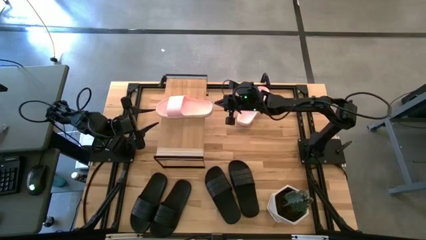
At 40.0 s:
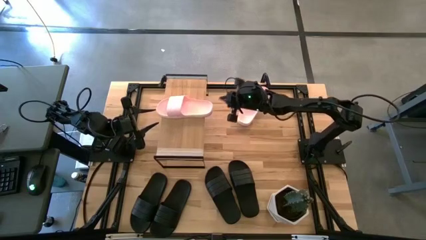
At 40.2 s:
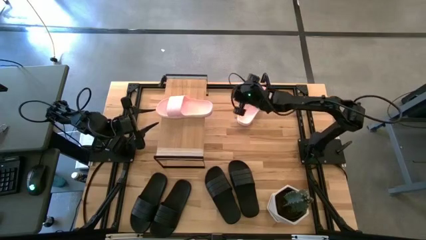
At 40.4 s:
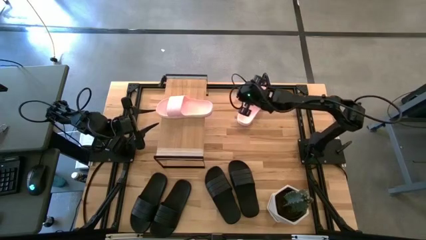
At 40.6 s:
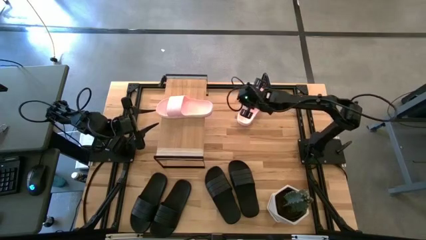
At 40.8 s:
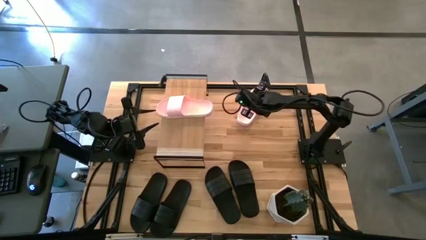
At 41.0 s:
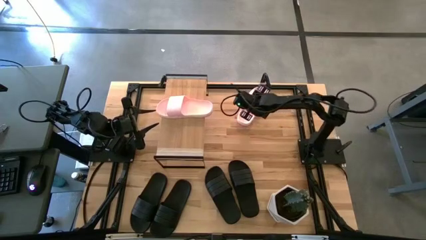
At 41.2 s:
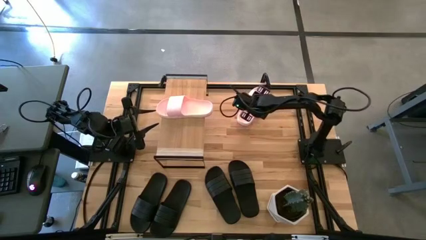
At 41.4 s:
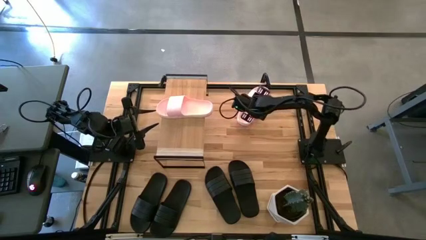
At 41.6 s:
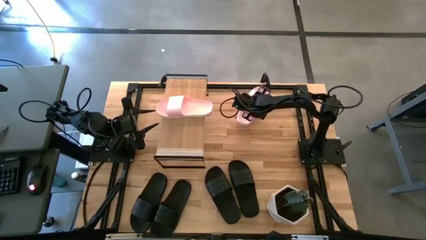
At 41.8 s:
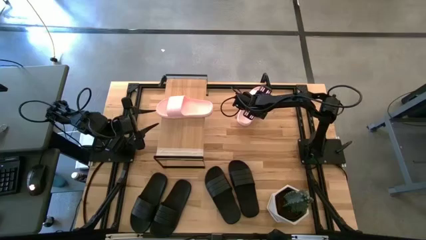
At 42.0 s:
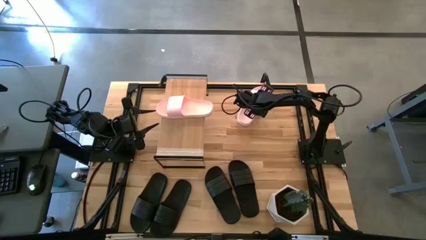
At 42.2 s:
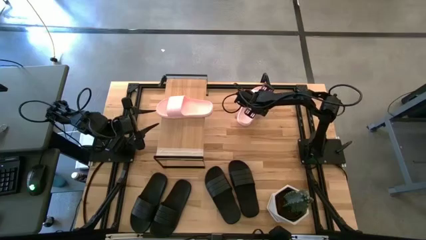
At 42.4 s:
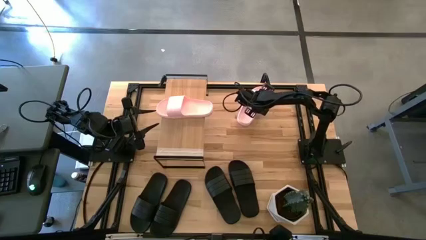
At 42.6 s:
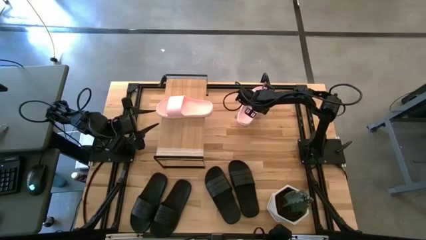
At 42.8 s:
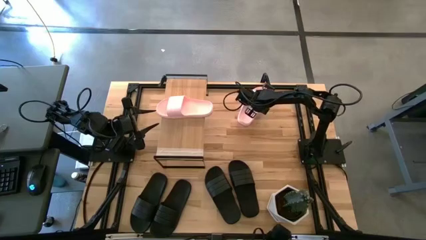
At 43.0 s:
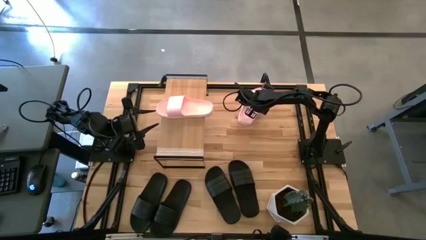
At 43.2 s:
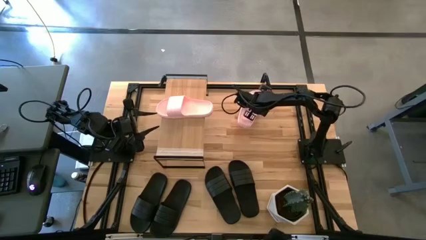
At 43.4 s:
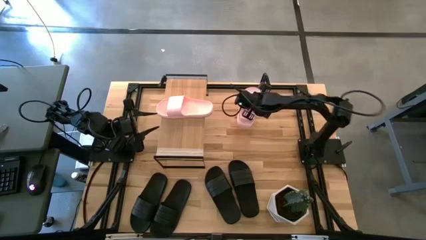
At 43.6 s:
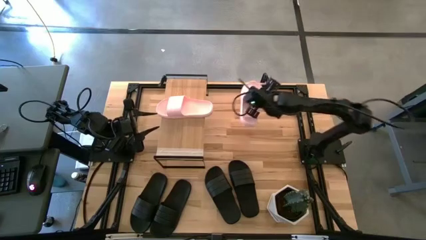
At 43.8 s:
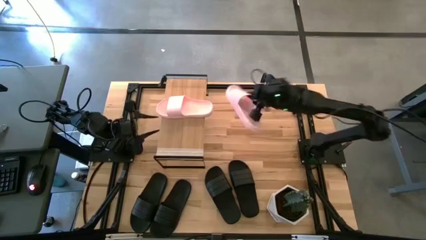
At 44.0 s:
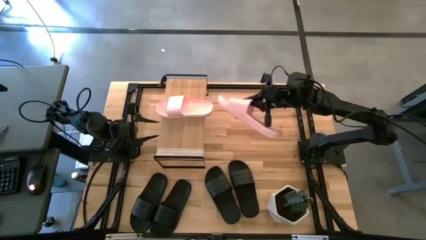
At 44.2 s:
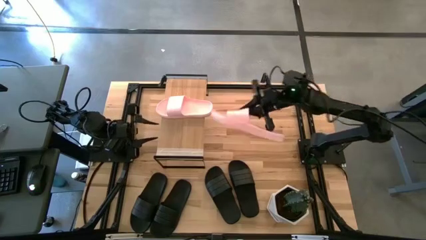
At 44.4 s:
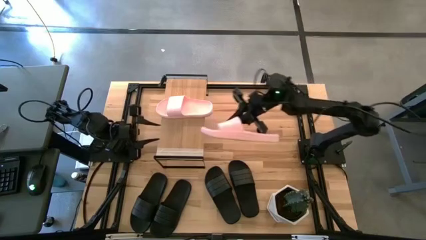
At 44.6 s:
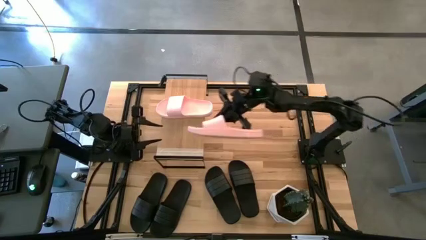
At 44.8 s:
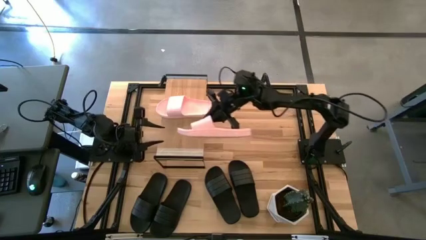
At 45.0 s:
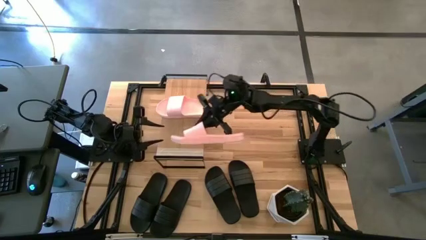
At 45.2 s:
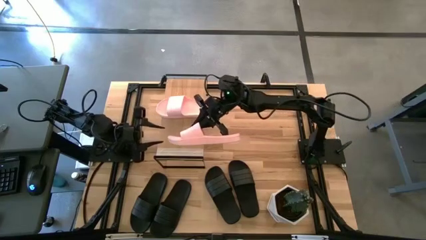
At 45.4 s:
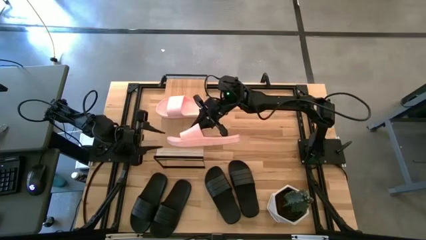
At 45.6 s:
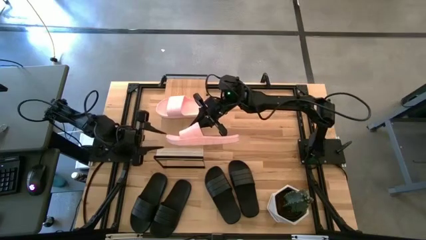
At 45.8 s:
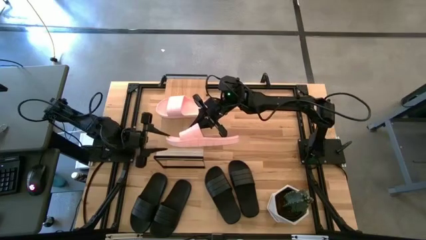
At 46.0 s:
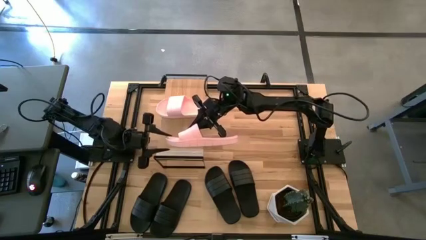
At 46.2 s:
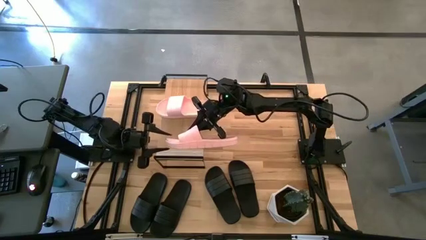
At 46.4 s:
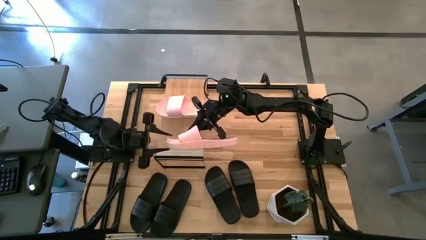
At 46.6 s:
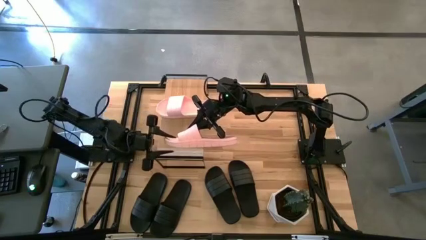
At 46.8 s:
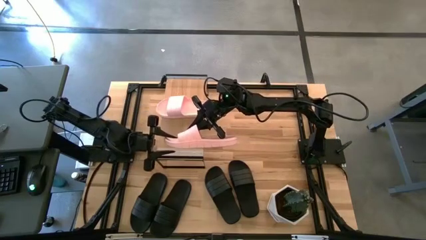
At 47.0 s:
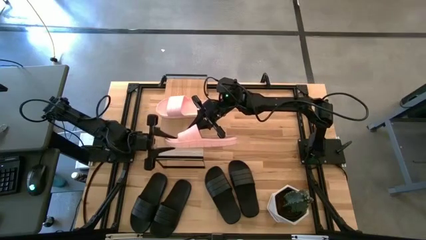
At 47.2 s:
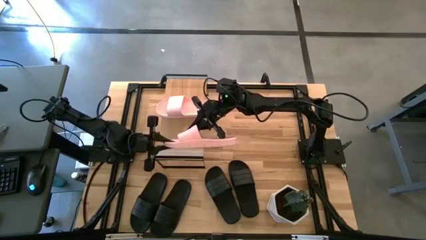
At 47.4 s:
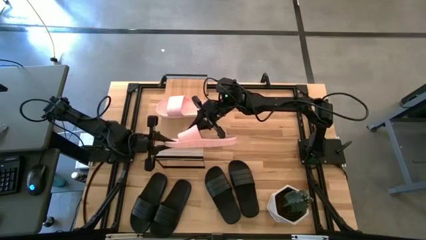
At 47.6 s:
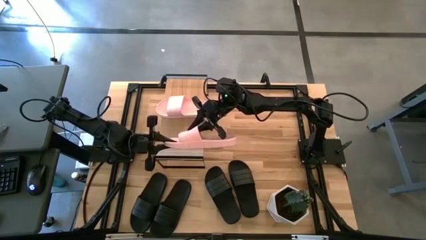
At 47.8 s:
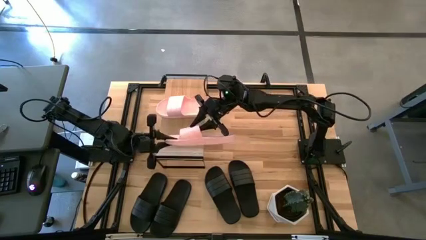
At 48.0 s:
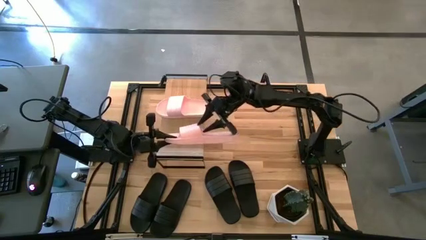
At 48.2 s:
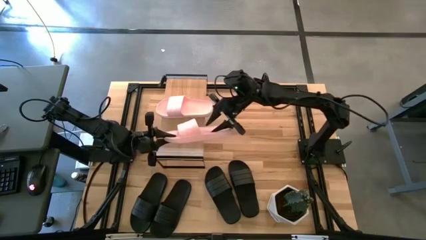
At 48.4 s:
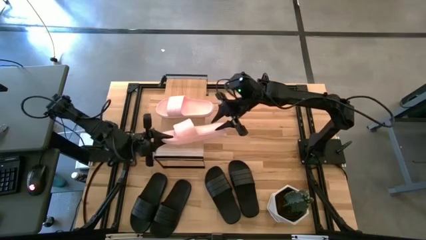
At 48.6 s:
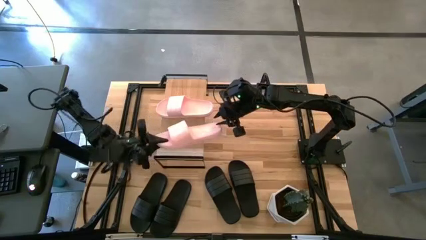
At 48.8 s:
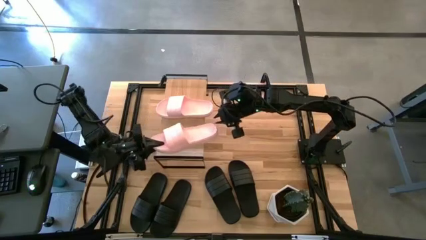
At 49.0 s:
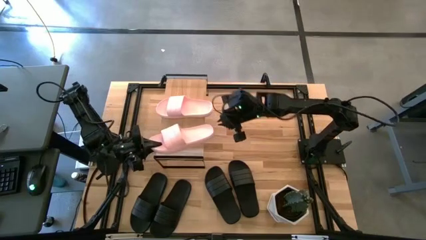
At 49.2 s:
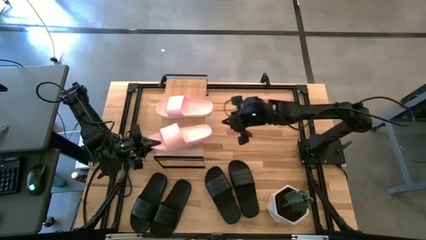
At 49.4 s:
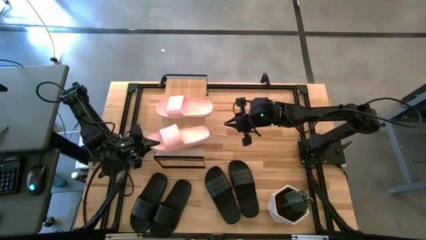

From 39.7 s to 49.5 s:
Task: Pick and place slides into the shelf
Put the pink slide on the shelf

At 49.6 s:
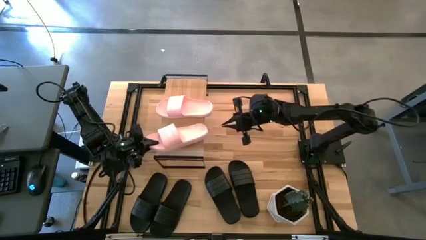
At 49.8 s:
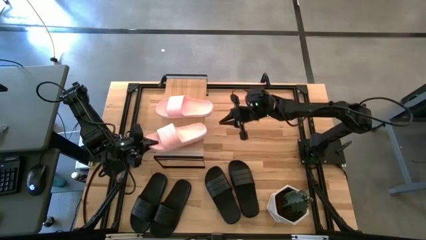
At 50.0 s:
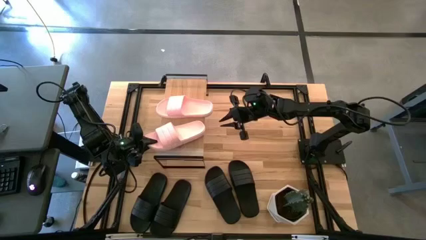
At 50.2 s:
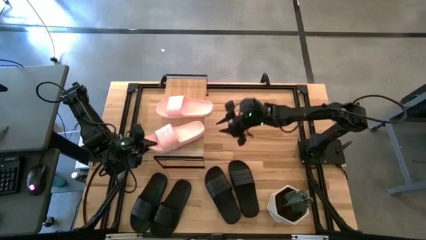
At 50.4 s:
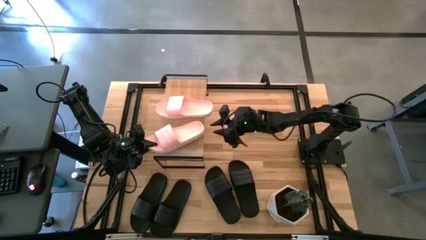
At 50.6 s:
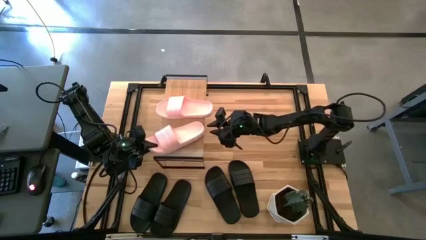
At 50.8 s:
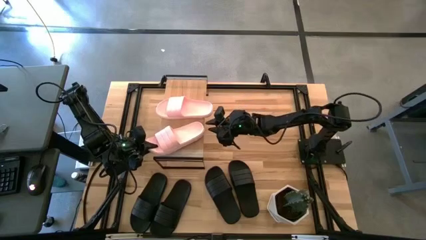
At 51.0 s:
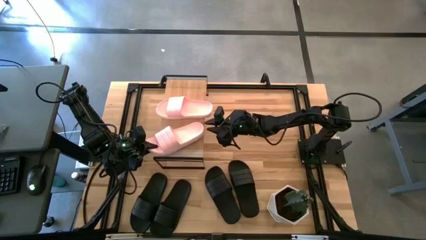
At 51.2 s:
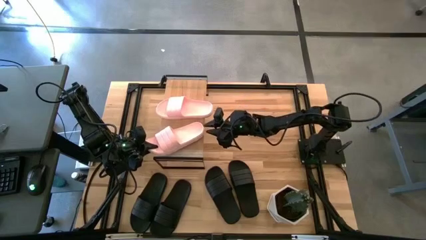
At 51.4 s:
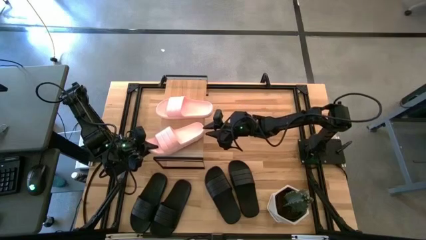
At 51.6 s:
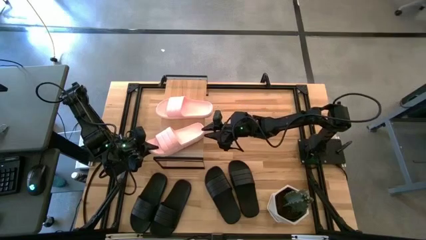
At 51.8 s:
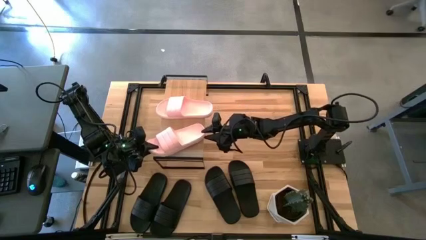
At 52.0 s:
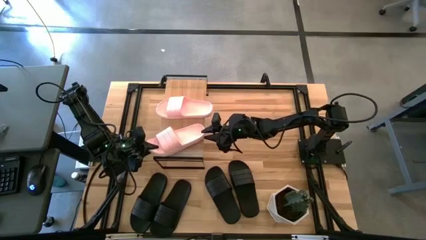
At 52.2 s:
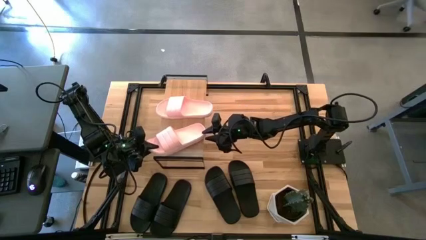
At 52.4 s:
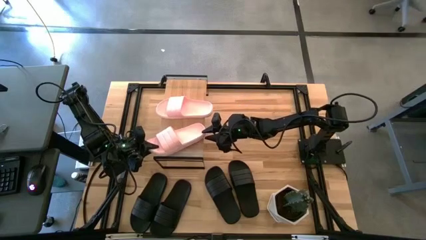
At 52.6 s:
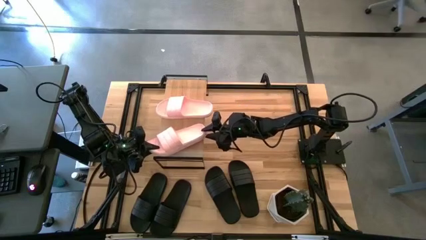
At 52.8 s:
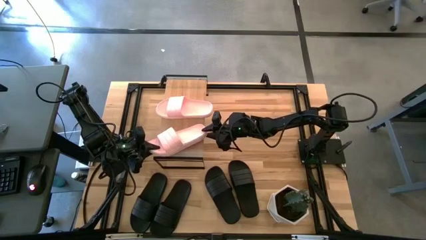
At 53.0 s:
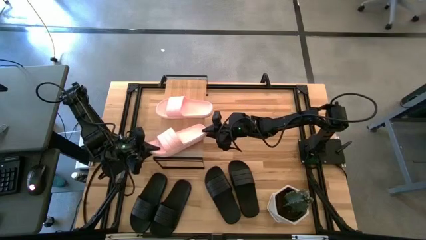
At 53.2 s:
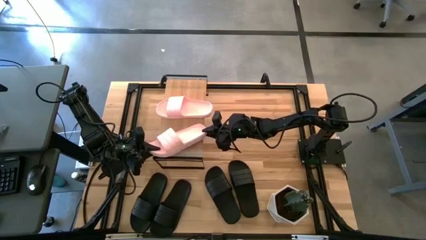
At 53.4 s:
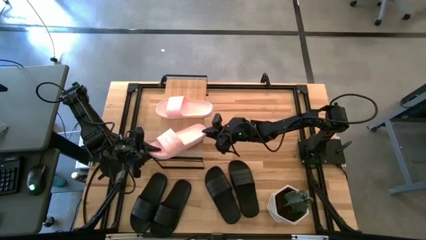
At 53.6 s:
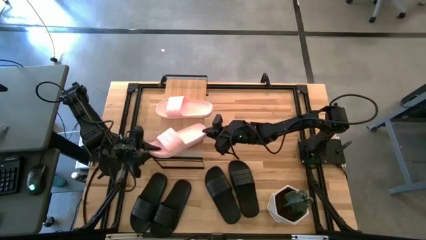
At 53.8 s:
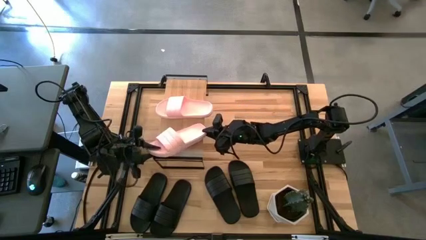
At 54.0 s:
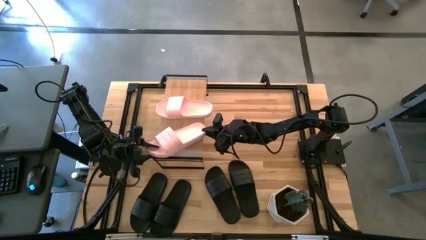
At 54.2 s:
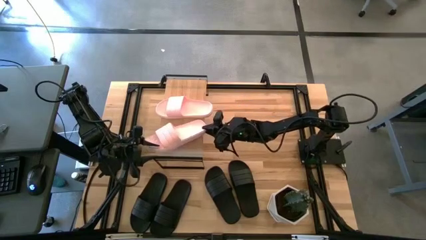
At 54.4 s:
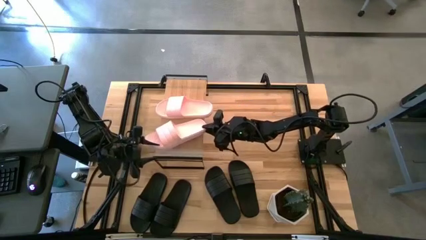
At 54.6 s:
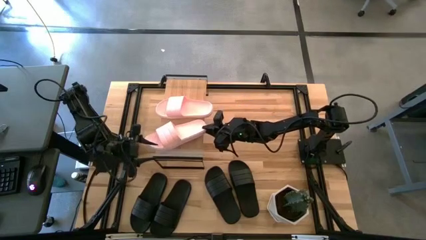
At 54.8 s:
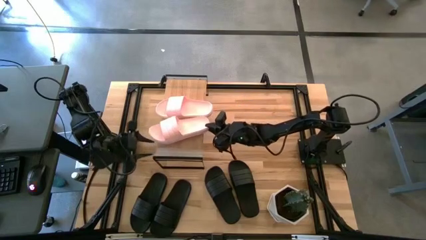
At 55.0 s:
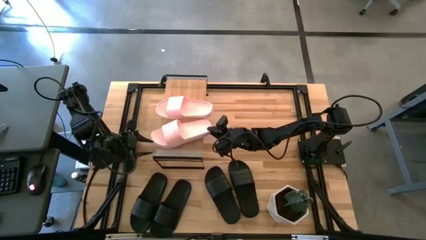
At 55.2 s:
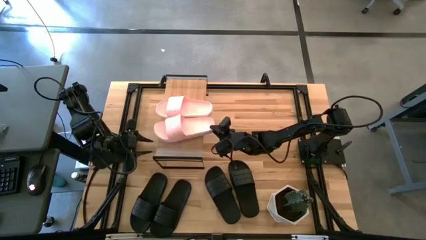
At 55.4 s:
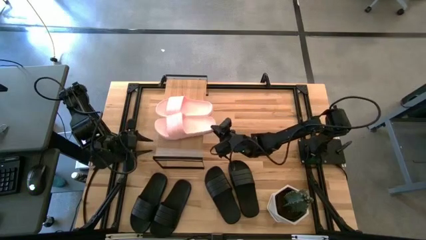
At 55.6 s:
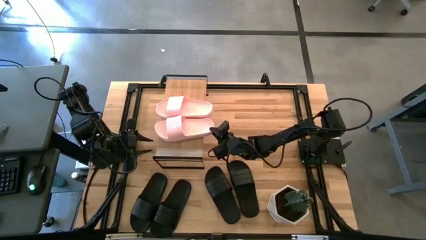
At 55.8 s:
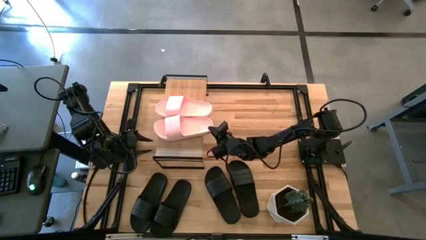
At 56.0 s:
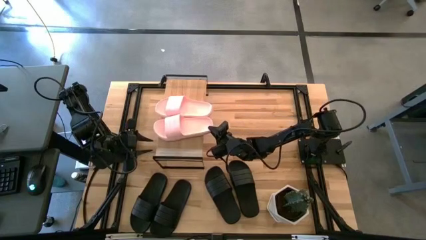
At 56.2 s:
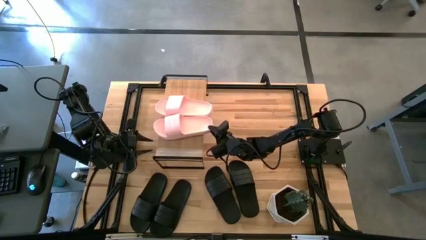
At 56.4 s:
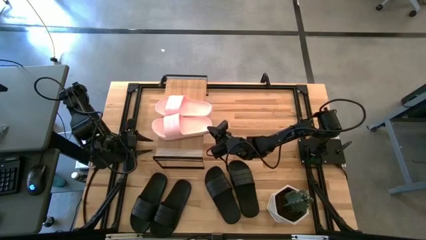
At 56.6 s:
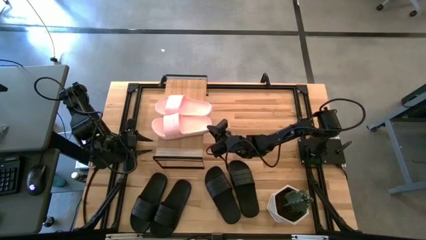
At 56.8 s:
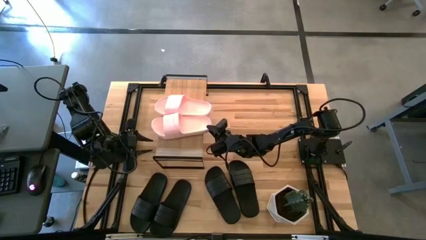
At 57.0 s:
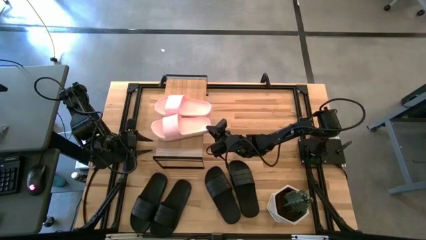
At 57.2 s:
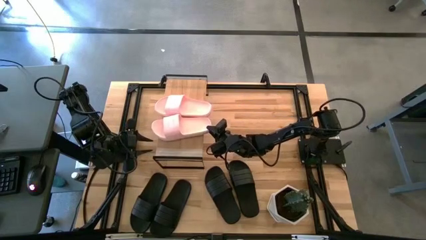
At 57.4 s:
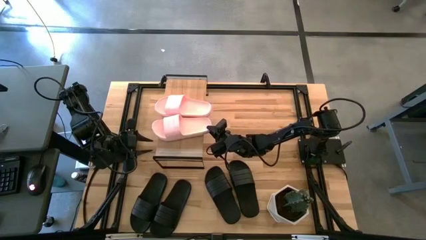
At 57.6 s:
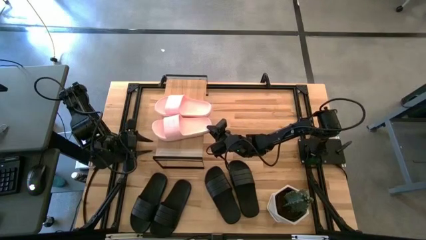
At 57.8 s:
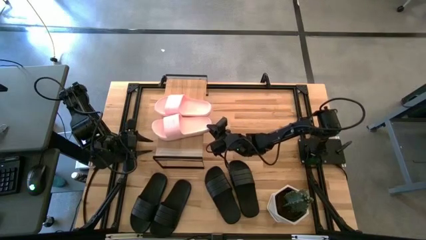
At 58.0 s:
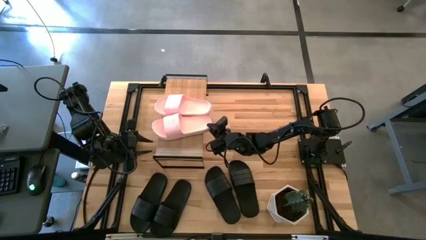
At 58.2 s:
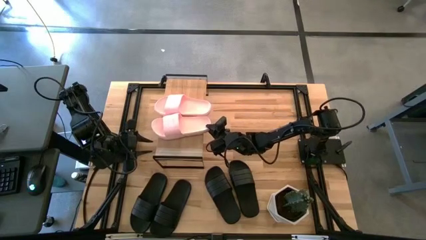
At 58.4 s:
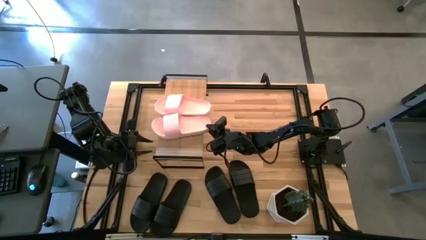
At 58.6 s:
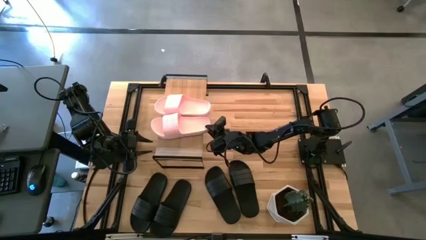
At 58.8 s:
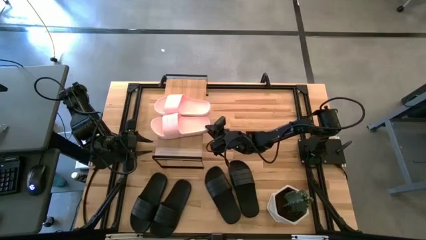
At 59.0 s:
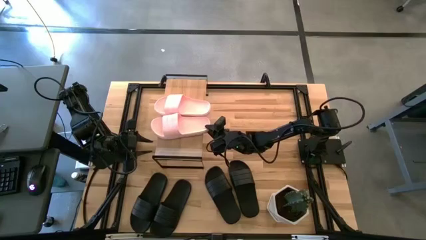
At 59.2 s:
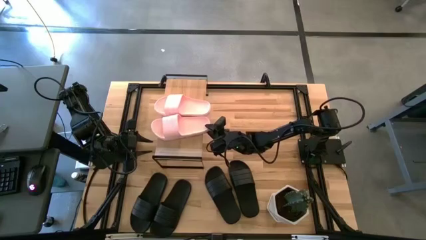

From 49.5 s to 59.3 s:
Put the pink slide on the shelf
